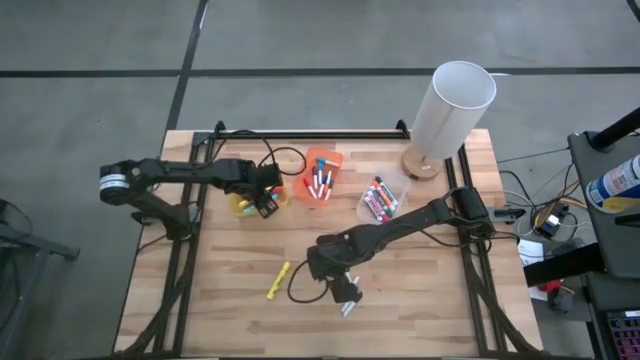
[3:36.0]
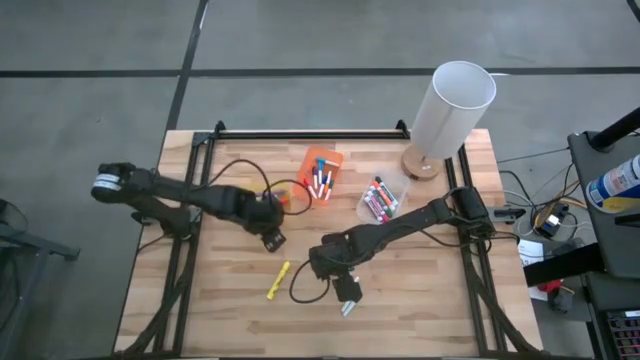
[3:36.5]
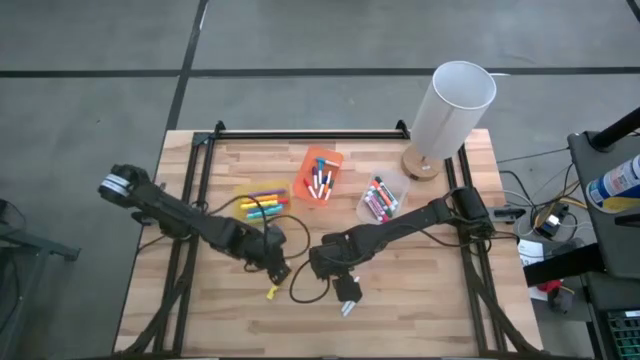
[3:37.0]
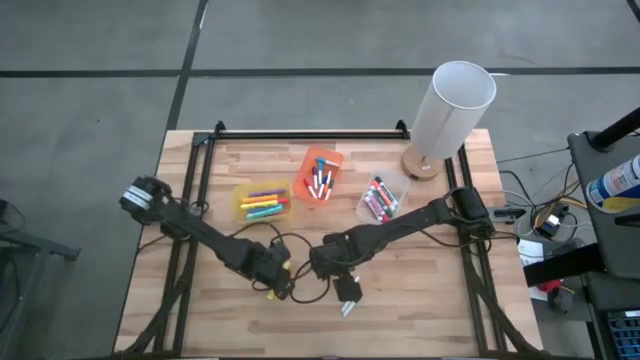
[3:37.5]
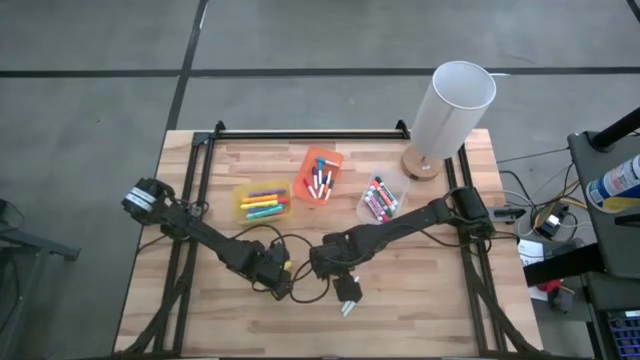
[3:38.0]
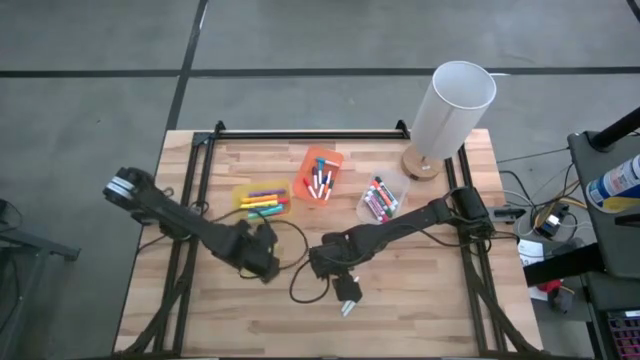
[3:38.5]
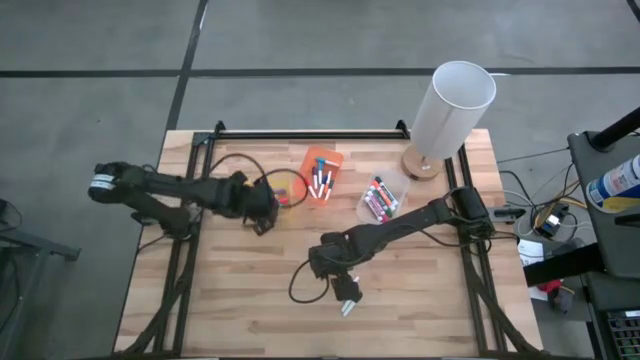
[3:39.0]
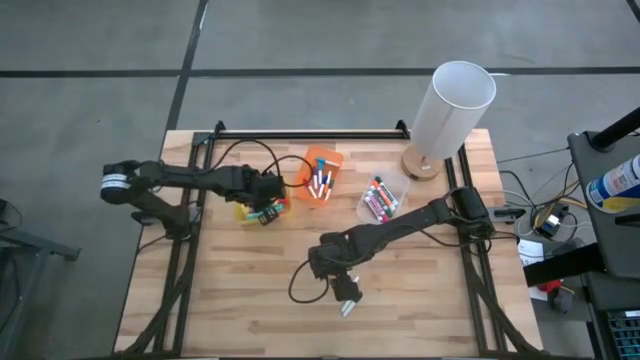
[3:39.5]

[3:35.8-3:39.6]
Task: Pick & Place Markers
Put the light yellow highlighter pen into the yellow bin

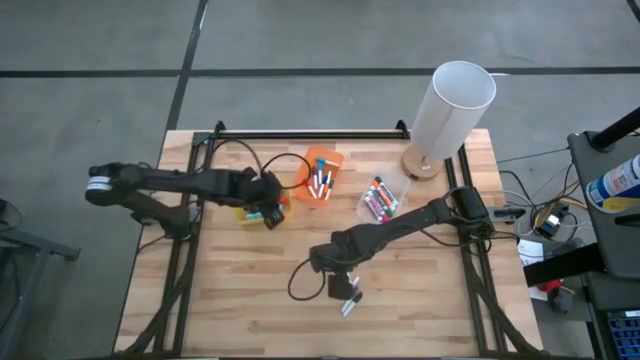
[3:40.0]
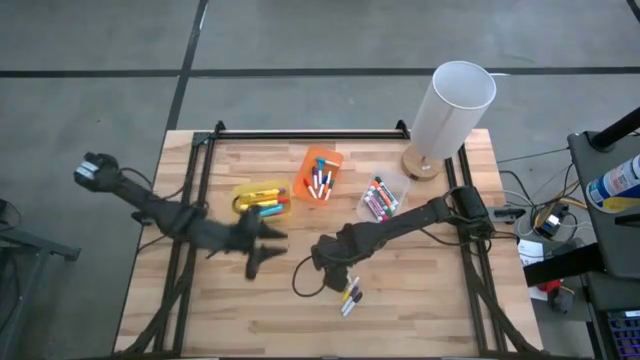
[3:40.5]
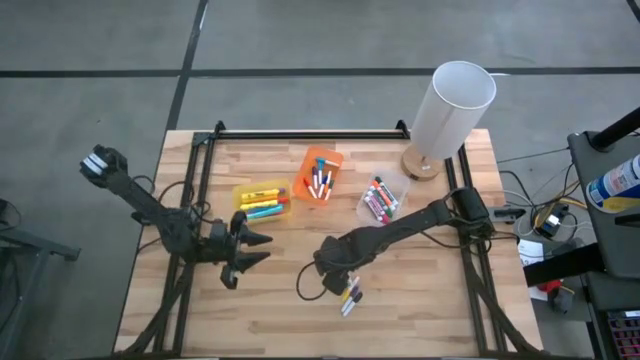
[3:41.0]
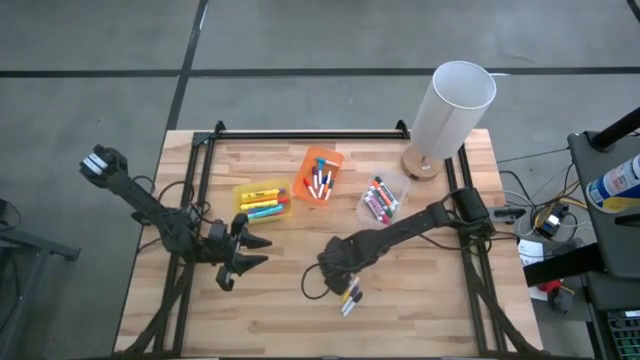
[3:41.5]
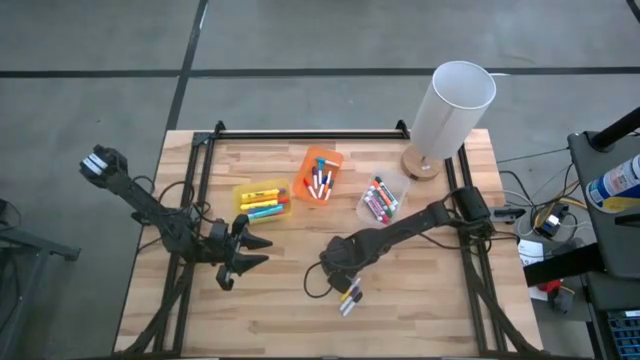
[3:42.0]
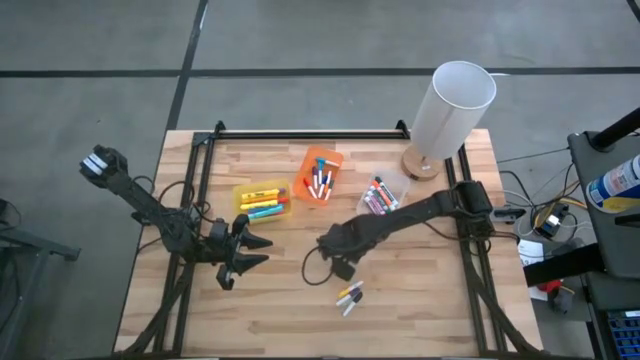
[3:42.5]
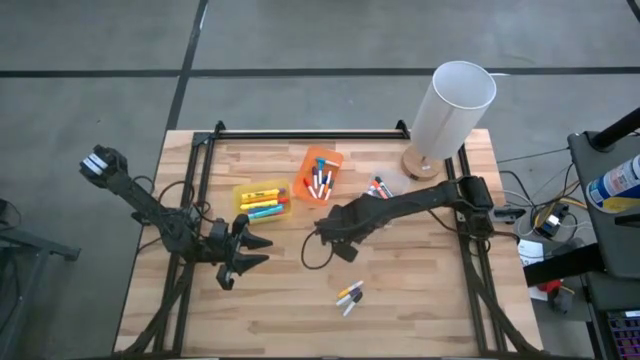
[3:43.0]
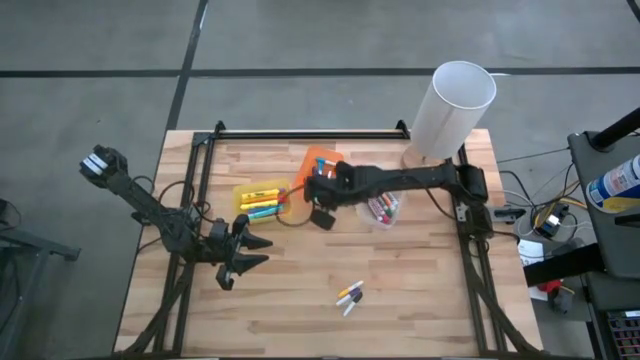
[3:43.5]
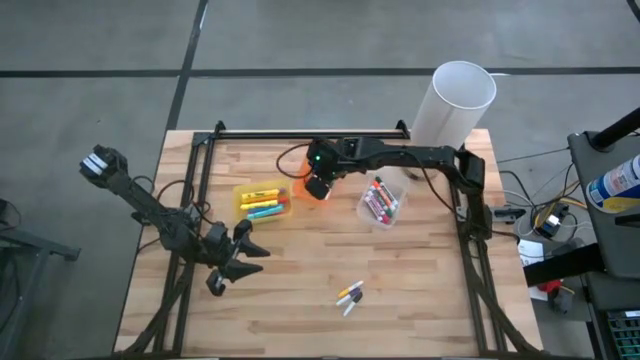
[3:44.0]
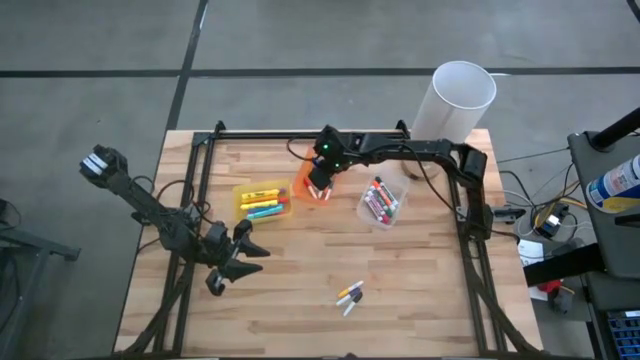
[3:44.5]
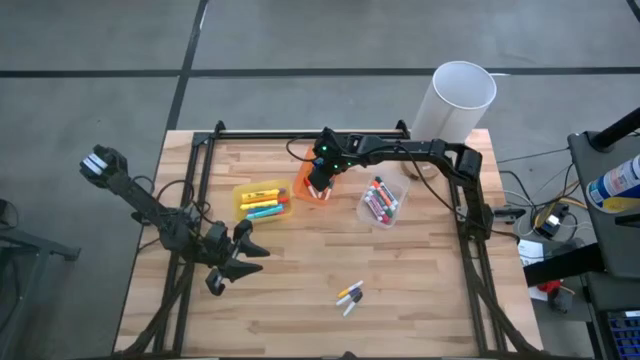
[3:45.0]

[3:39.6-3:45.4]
Put the blue pen into the orange bin

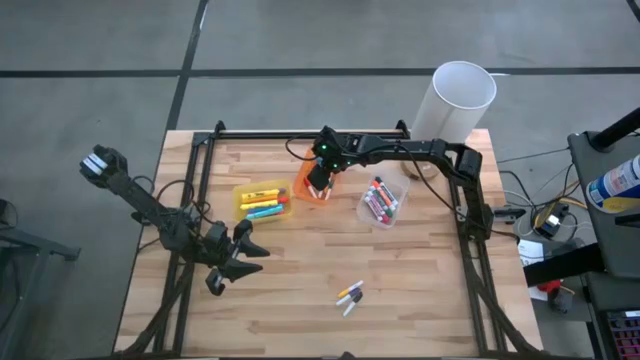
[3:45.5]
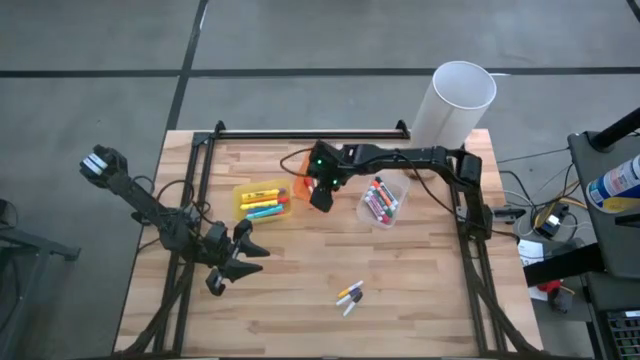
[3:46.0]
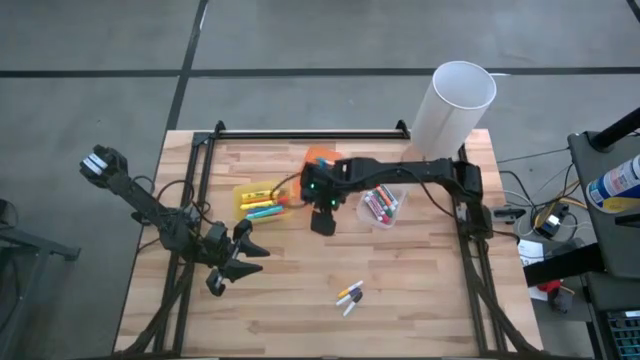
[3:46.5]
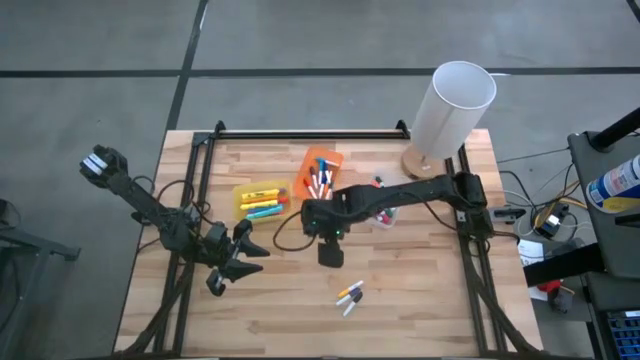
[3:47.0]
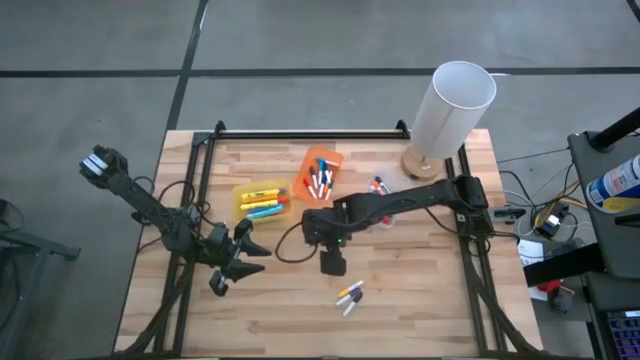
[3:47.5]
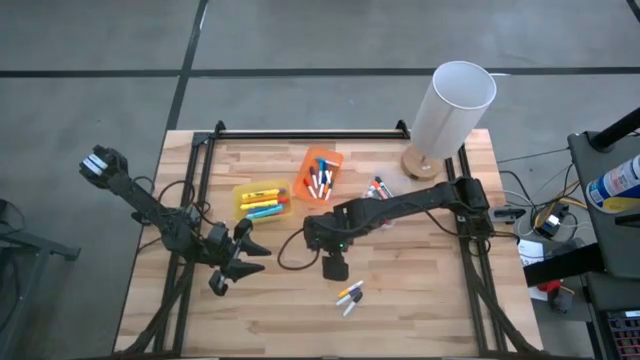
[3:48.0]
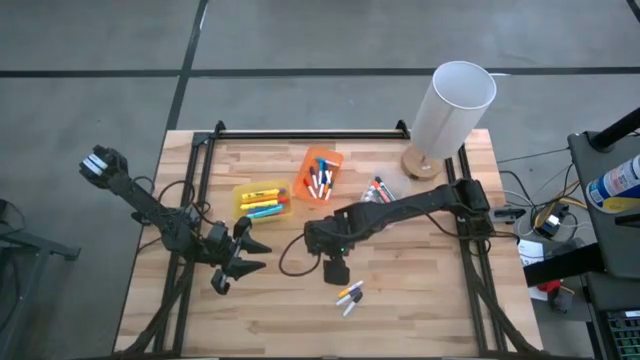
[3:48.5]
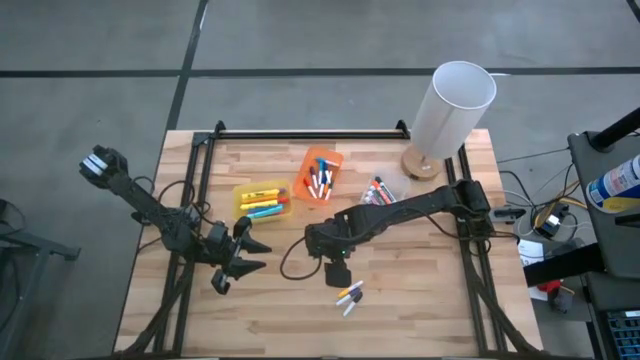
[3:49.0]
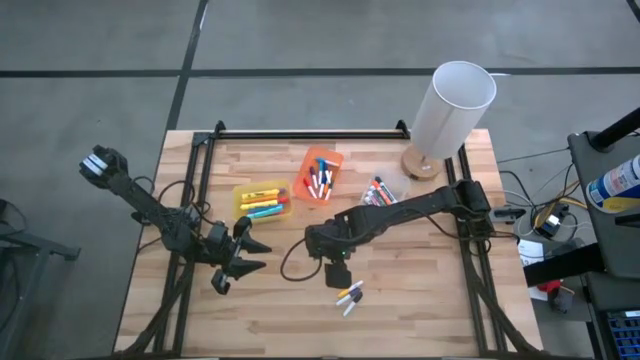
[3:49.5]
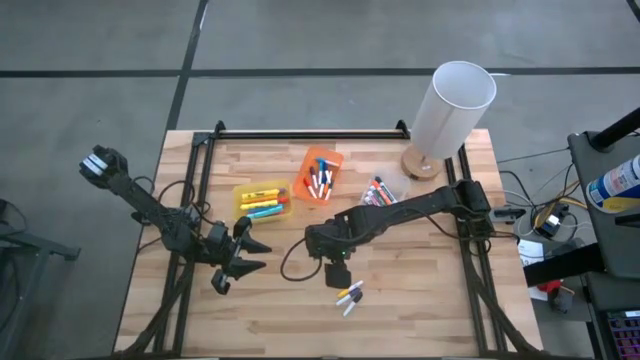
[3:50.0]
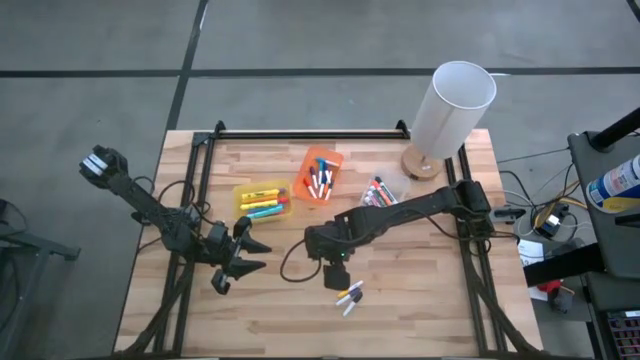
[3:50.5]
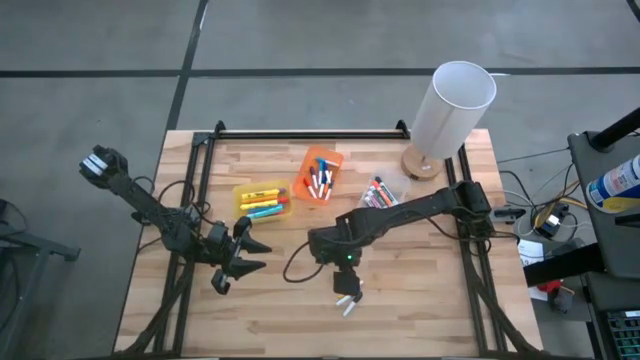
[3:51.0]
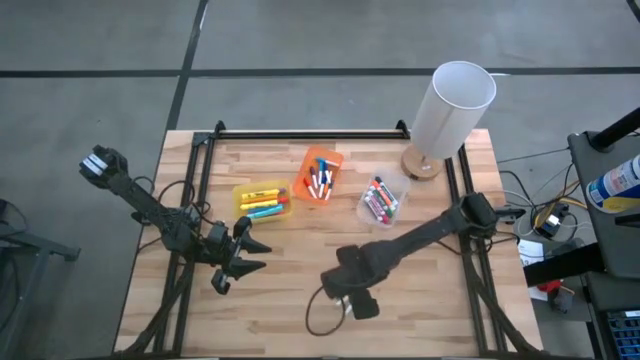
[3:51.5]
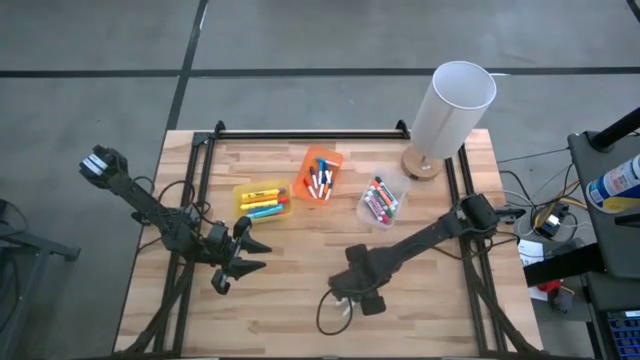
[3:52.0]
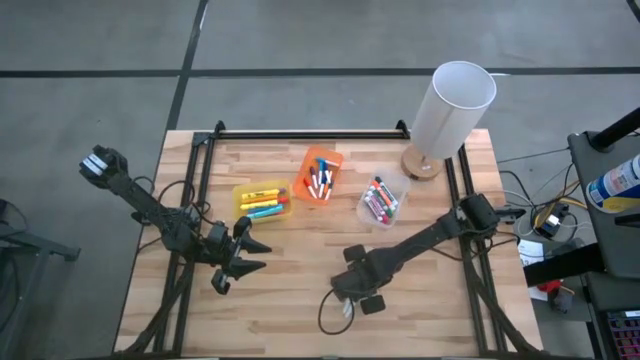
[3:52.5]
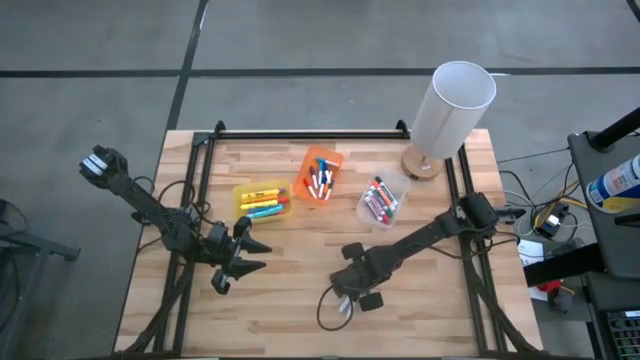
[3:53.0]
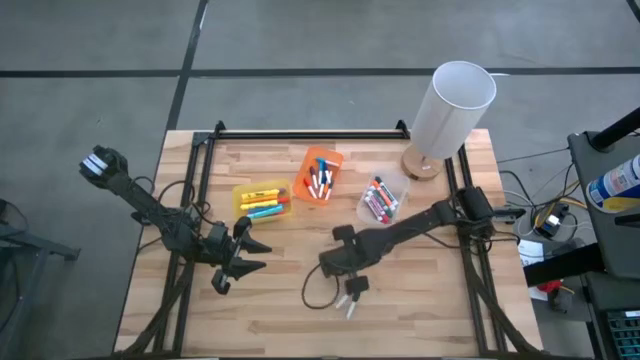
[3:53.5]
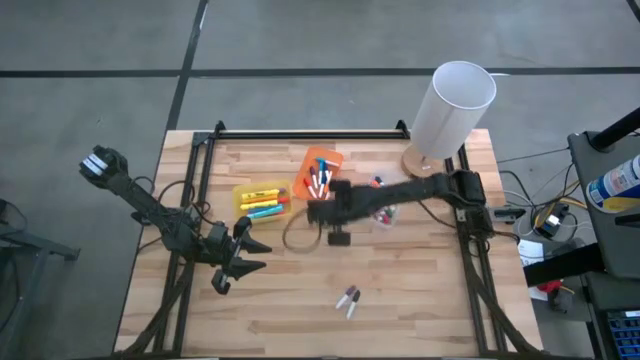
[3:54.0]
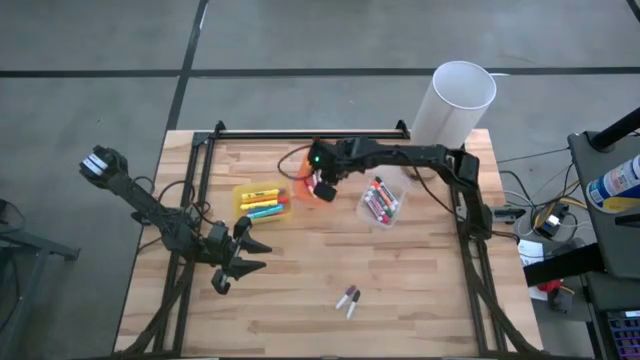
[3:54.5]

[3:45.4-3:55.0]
Put the yellow pen into the orange bin

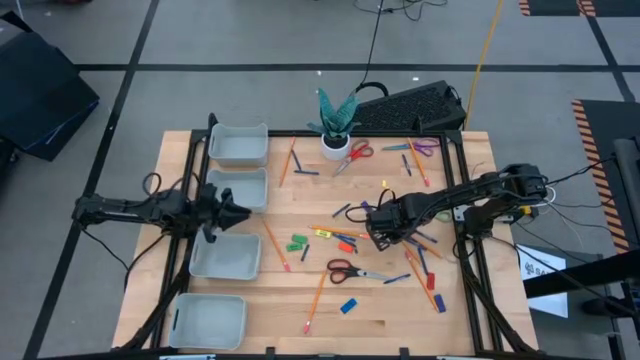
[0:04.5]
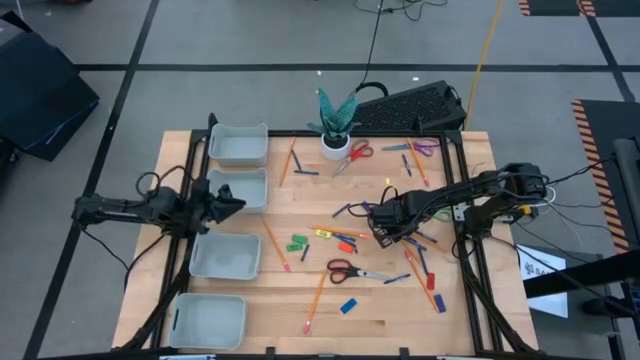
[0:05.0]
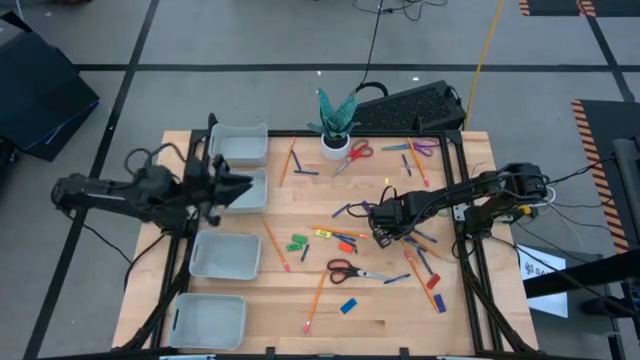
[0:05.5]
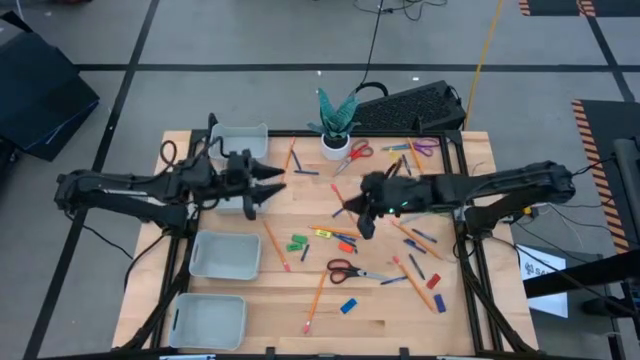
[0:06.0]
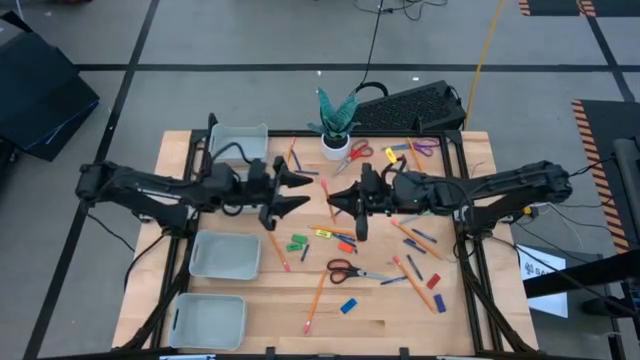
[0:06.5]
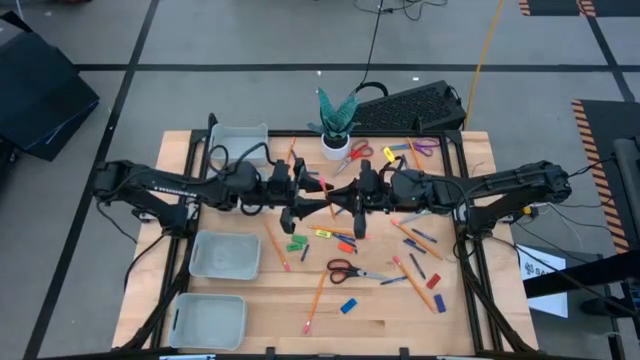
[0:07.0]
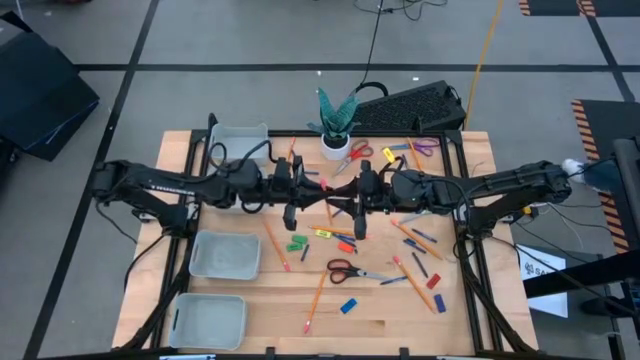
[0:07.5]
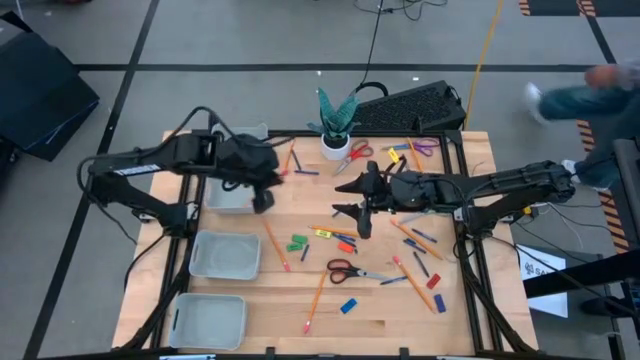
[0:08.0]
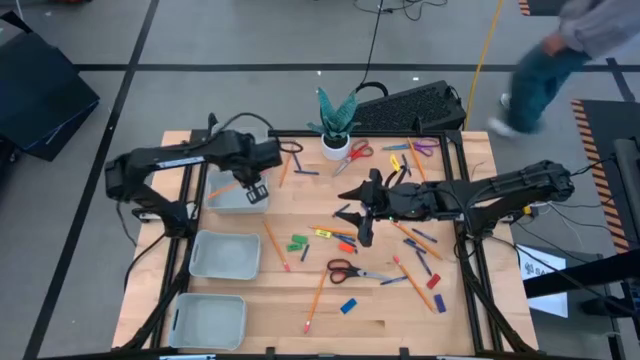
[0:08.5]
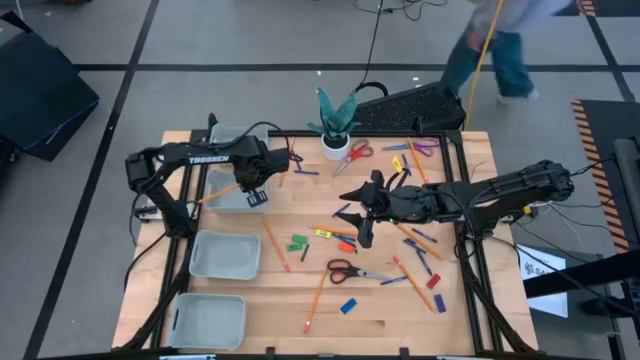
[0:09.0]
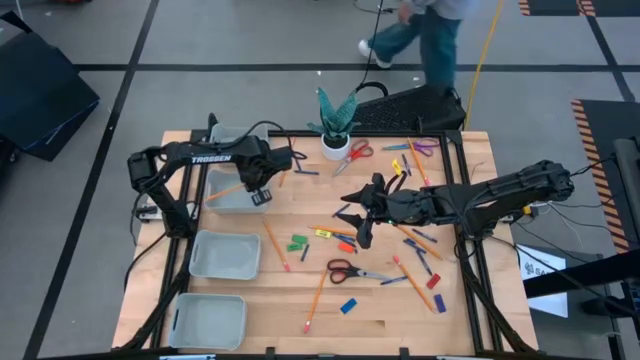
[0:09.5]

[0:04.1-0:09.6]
Task: Sort crayons/erasers/pens/pencils in bins
Put the orange pencil into the middle top gray bin
